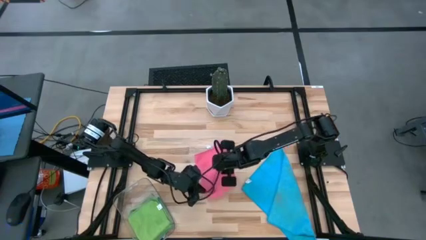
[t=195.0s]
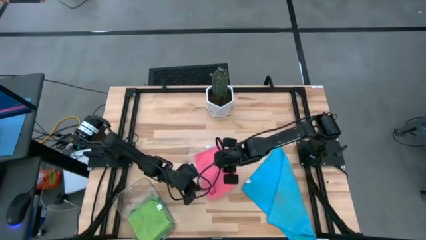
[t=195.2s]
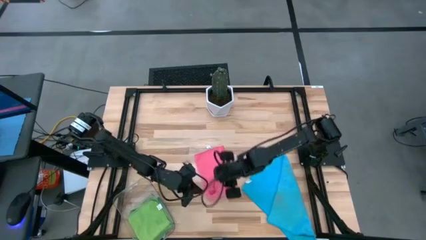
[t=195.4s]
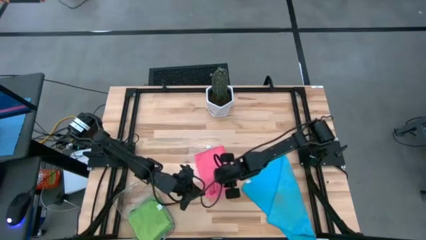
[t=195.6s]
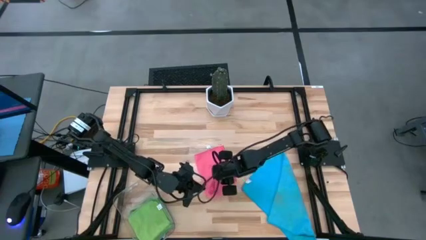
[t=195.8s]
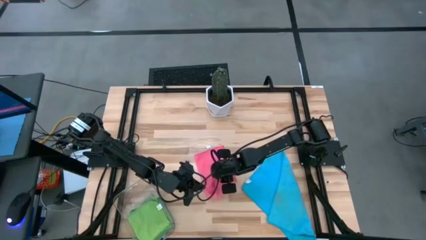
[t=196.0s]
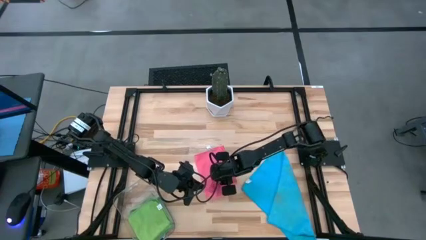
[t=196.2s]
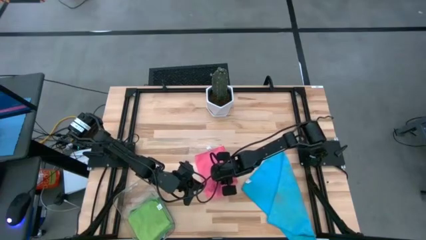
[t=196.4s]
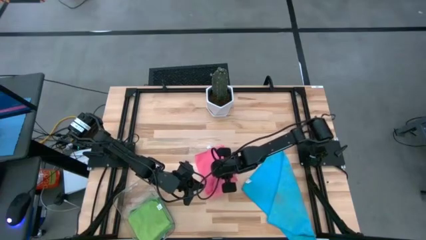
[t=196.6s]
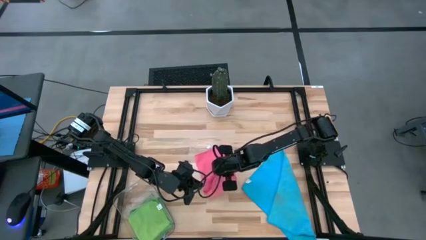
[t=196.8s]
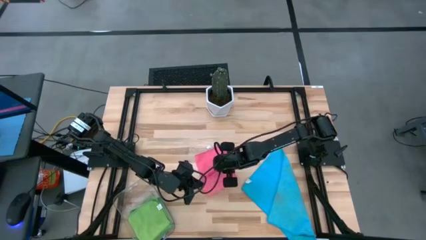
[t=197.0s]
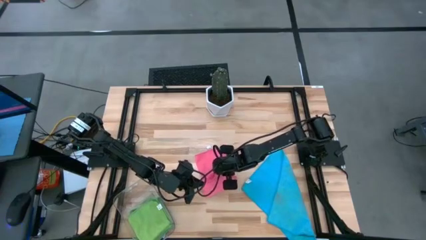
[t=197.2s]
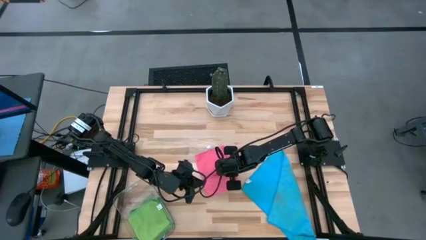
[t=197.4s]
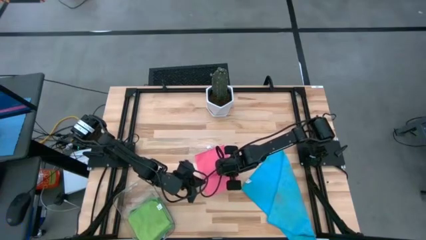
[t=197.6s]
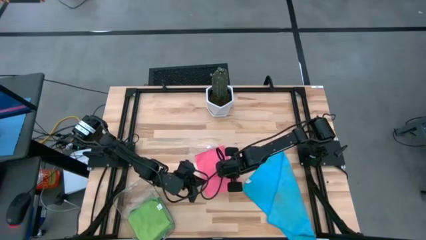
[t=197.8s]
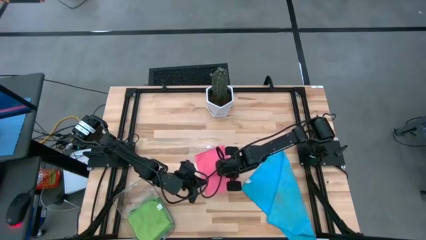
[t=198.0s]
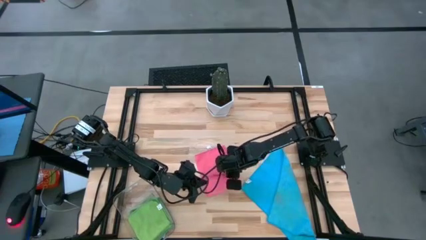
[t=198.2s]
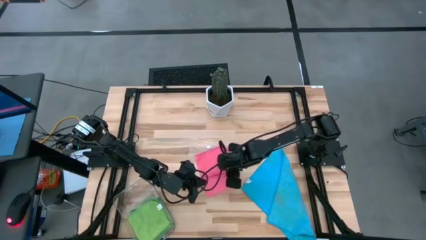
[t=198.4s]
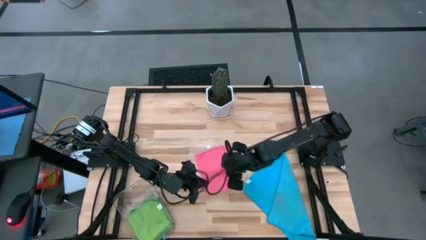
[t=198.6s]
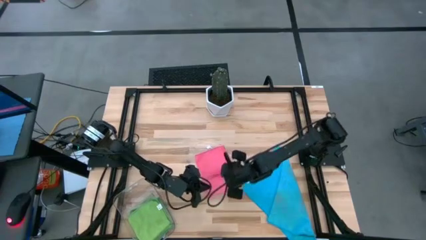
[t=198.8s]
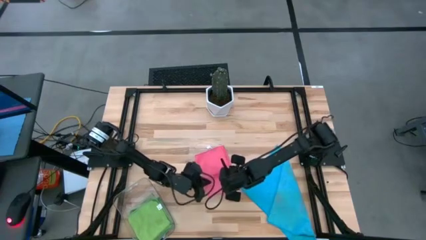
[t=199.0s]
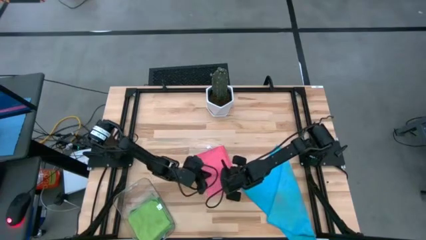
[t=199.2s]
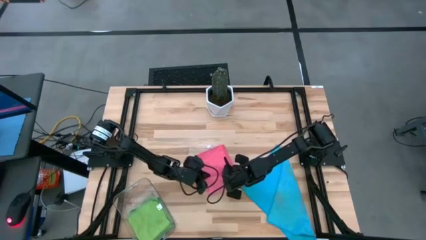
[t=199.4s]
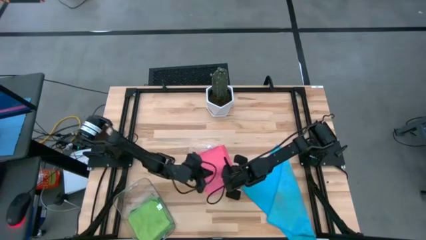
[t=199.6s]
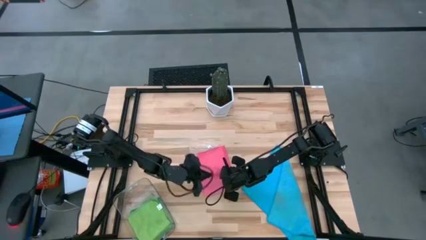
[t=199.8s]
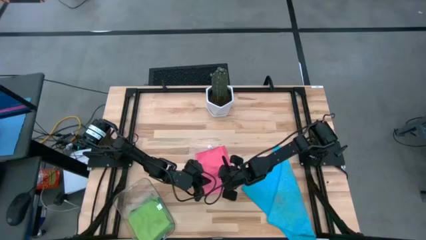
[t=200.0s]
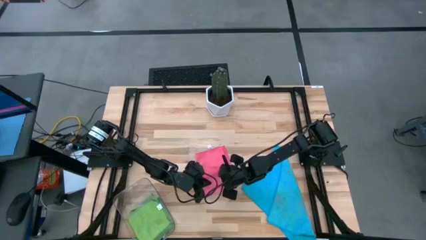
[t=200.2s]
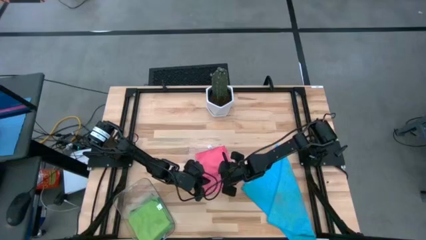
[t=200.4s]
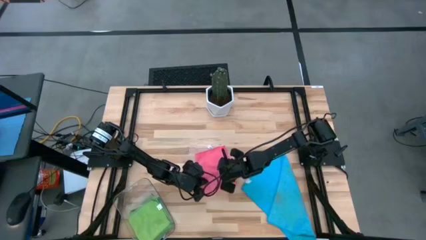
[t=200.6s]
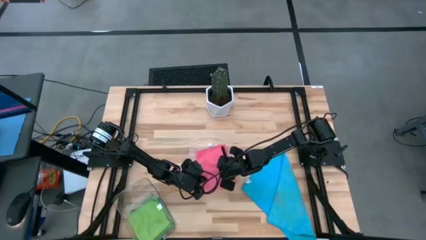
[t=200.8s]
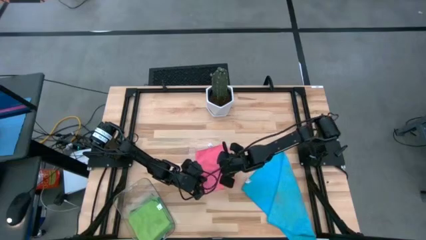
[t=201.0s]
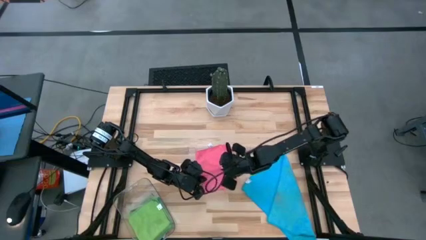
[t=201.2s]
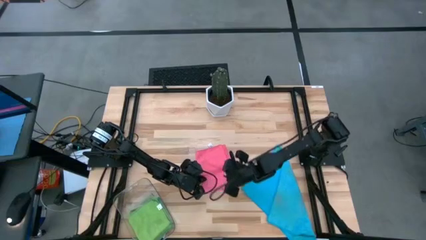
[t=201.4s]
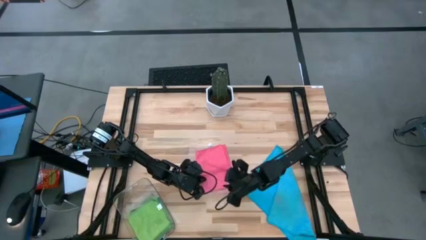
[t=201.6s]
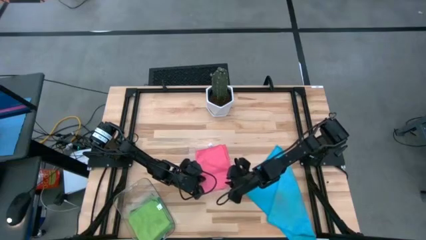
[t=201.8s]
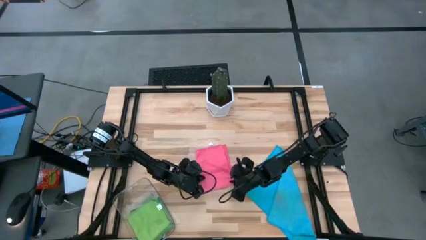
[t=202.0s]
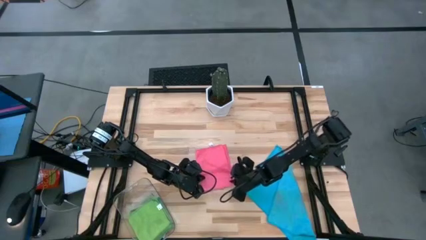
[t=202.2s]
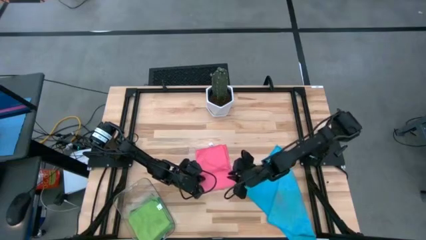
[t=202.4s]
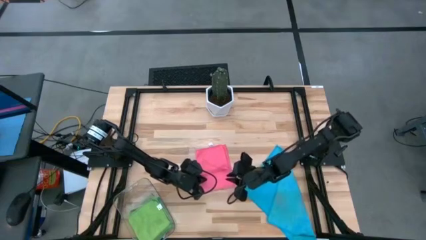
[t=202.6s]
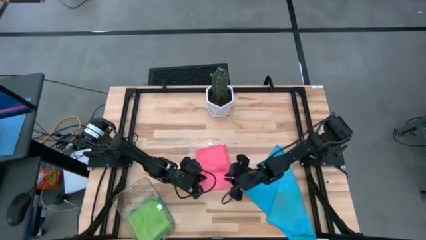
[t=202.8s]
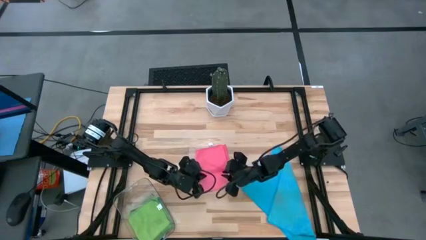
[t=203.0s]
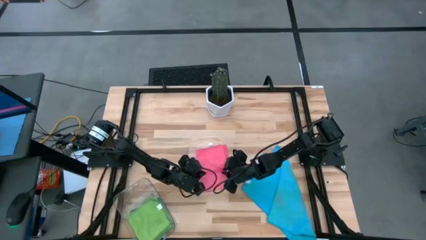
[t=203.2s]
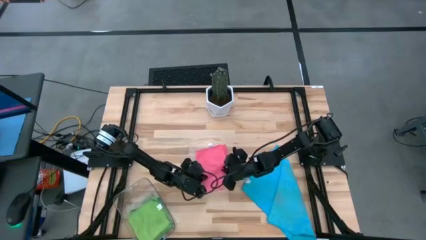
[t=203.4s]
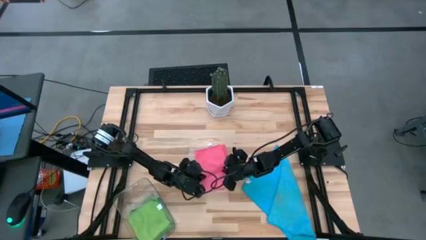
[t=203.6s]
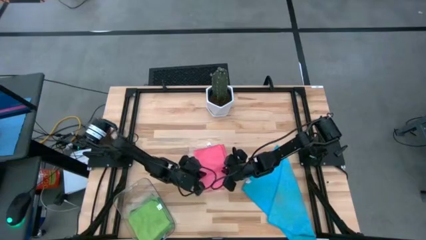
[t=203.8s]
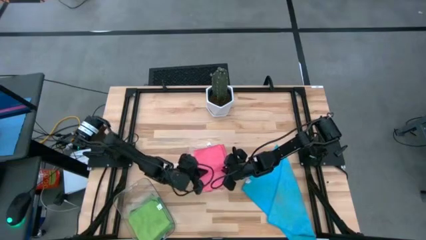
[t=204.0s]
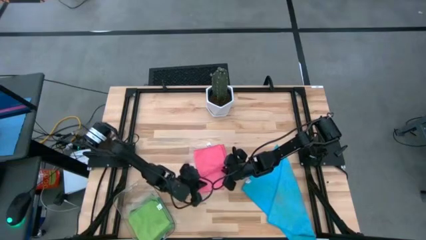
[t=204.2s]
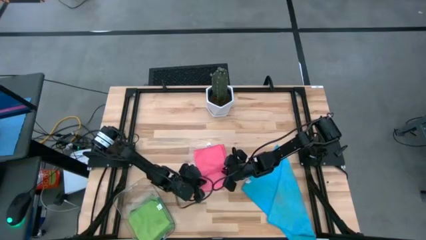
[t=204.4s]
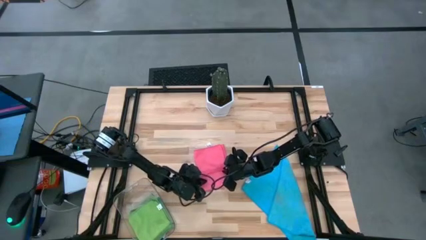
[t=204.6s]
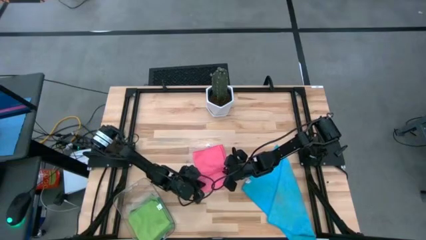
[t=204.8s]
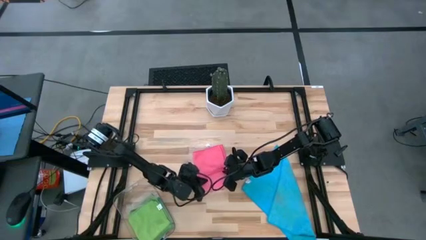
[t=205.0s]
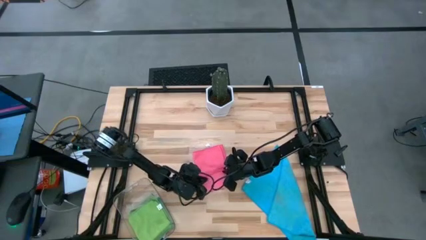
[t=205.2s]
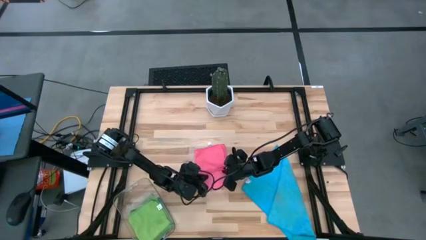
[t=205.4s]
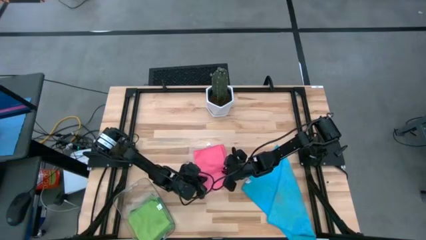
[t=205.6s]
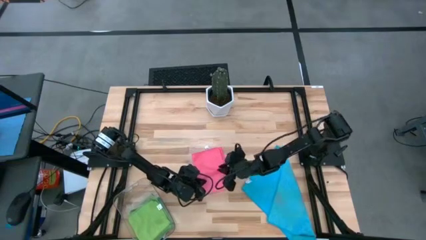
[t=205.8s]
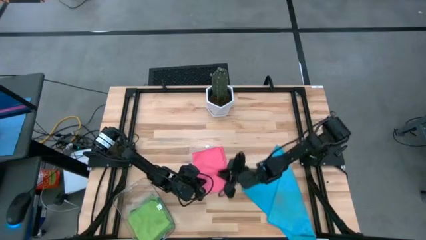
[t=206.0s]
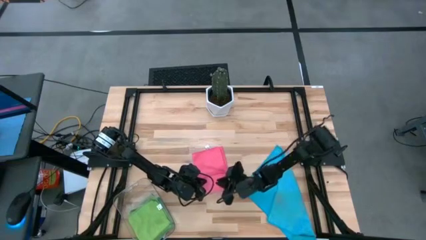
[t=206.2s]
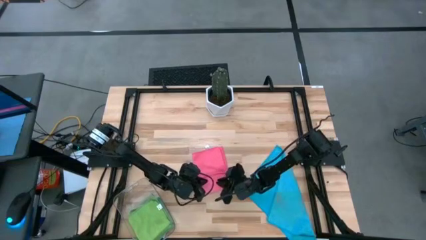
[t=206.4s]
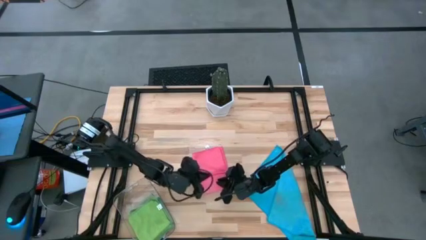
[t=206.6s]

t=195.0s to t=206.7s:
Task: Fold microfiber towels
Fold the pink microfiber cloth

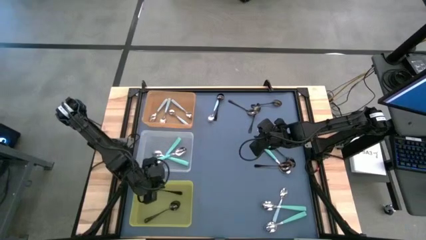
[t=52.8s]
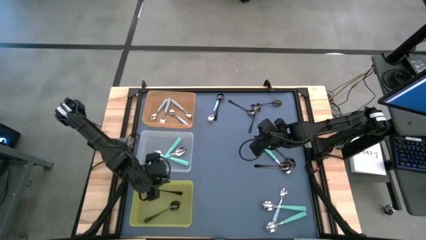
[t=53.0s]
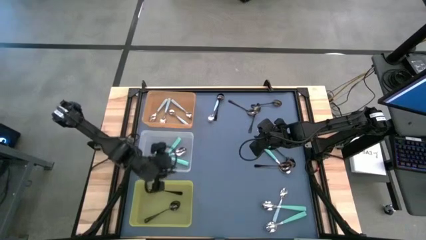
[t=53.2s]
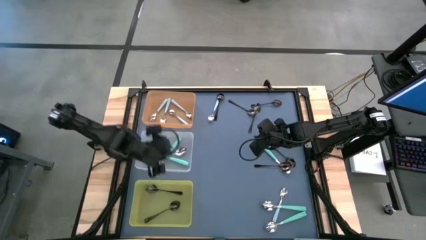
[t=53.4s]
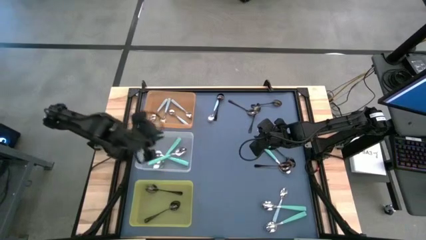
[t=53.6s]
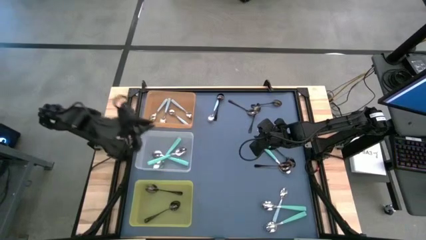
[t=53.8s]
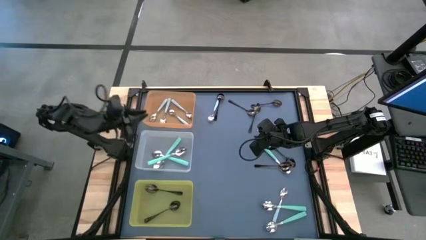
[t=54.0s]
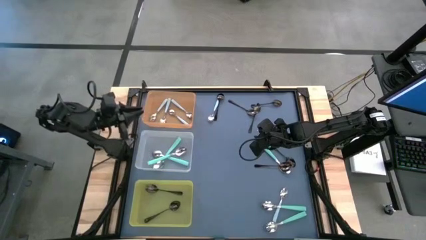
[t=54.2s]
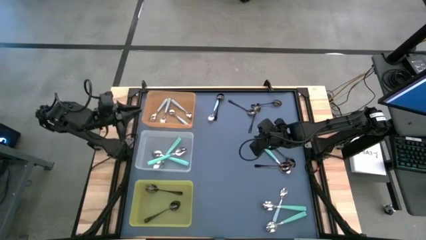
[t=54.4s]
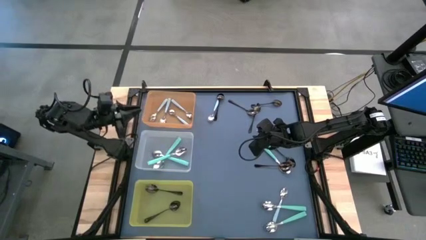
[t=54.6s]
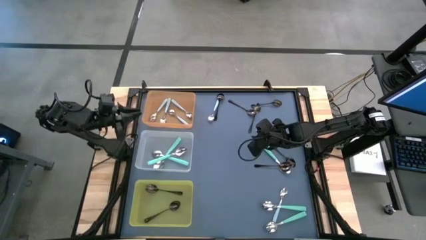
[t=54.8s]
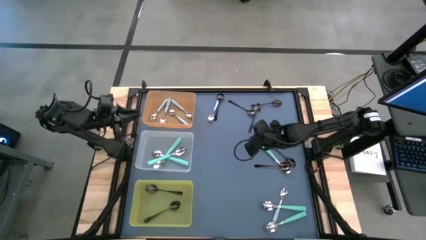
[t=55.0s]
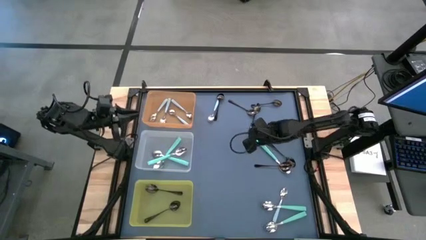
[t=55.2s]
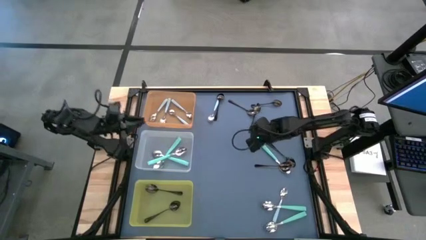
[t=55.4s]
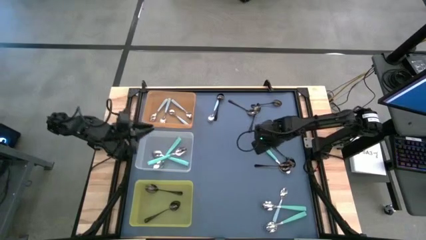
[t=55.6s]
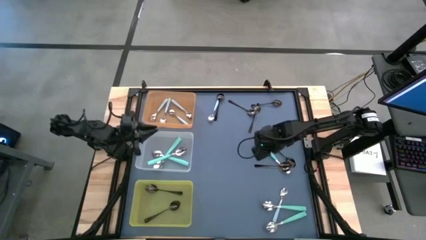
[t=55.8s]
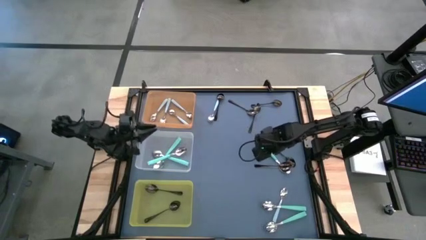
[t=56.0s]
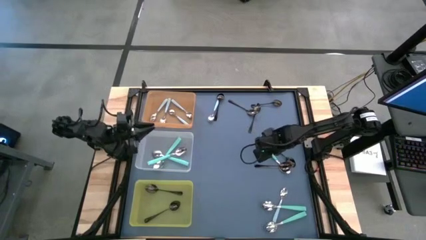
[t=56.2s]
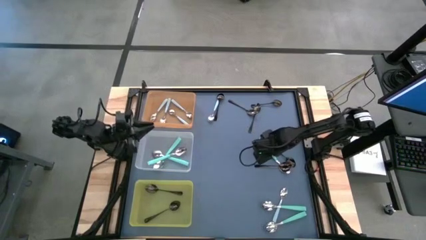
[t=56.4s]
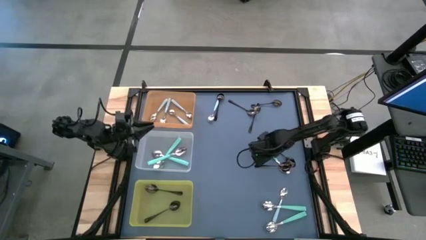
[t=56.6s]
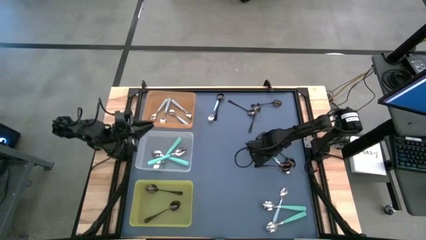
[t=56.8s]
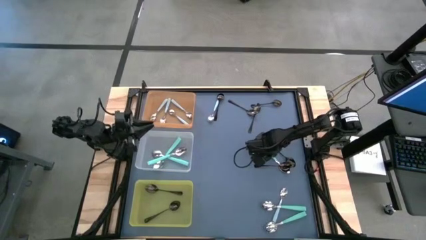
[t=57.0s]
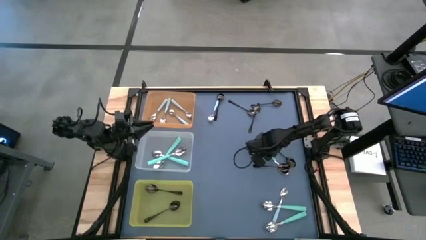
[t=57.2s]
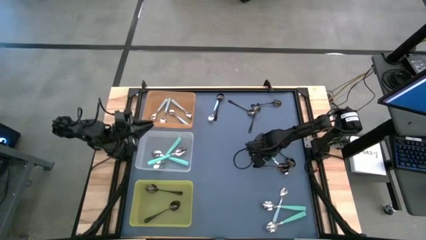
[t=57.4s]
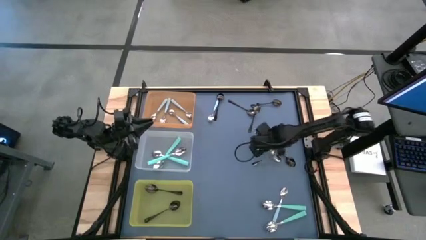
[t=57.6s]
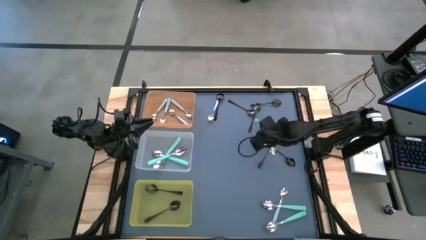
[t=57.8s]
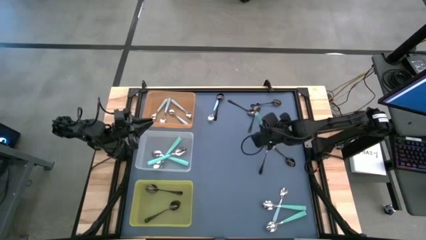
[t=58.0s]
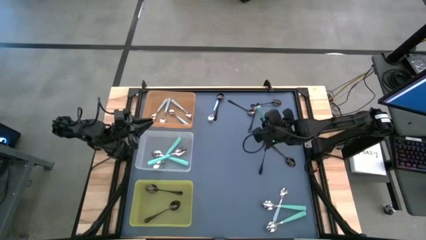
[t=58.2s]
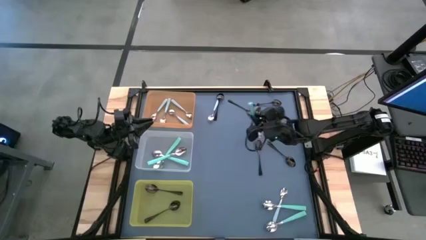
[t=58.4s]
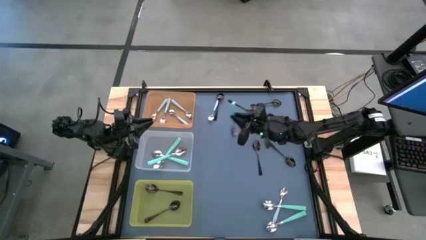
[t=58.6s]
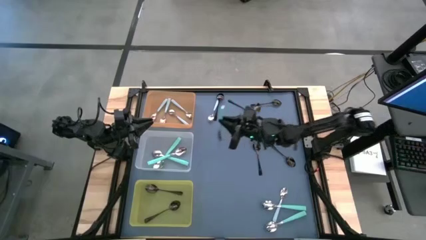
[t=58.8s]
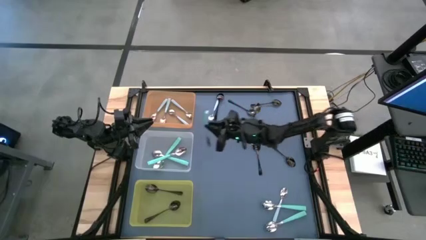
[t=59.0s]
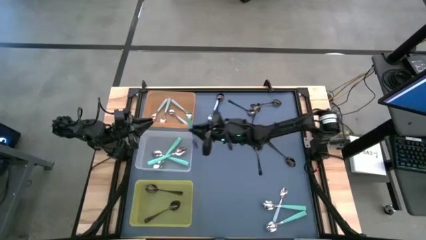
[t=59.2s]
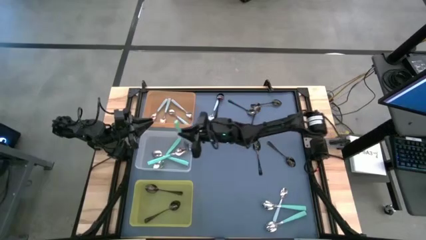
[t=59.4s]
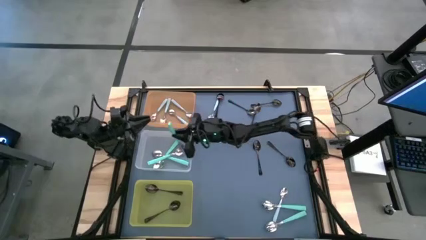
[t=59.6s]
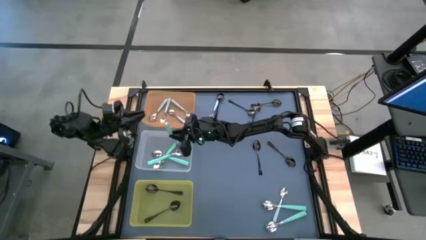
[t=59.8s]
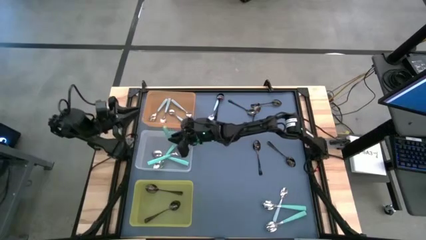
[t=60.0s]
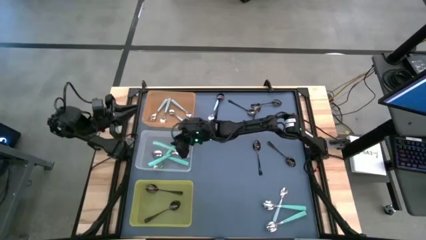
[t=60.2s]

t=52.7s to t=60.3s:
Task: Sort silverware by color (type)
Put the light green spoon into the transparent bin
